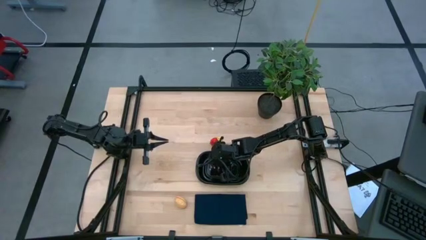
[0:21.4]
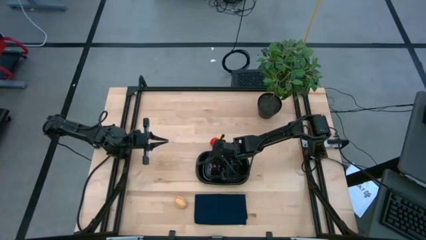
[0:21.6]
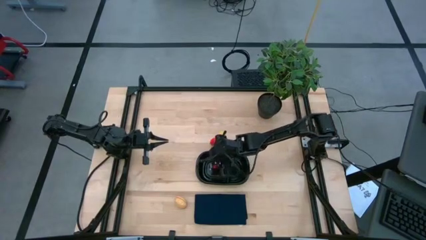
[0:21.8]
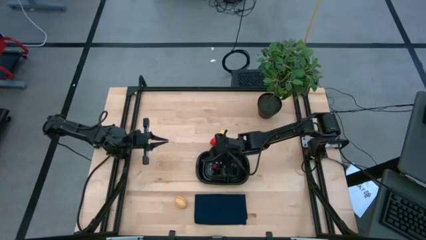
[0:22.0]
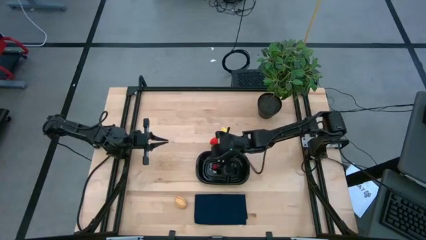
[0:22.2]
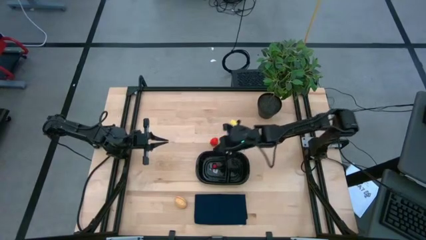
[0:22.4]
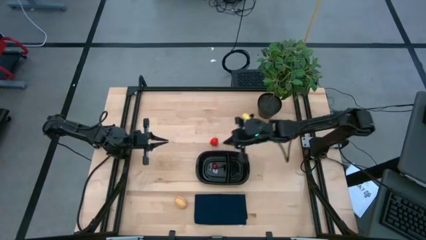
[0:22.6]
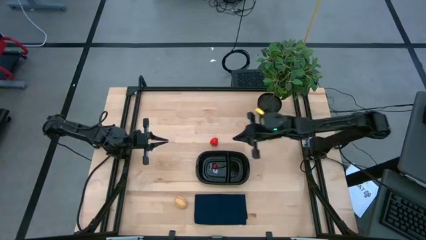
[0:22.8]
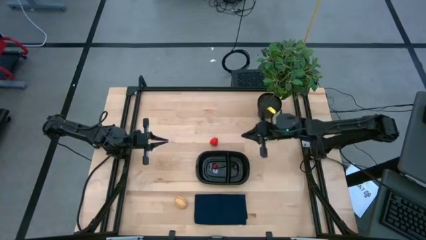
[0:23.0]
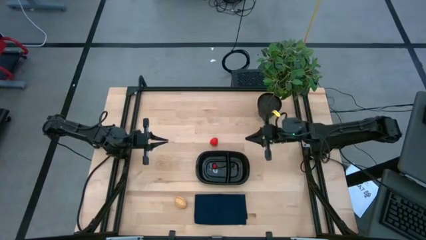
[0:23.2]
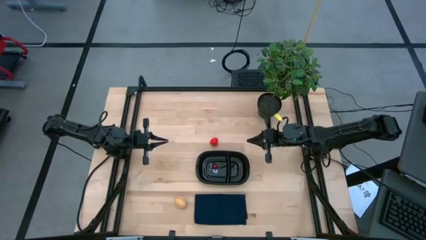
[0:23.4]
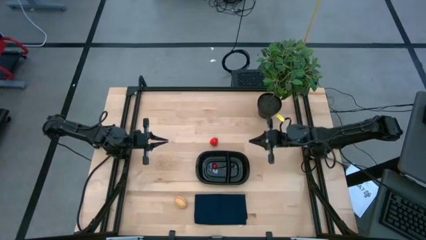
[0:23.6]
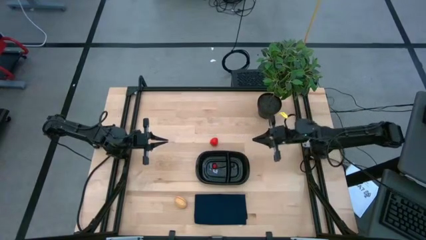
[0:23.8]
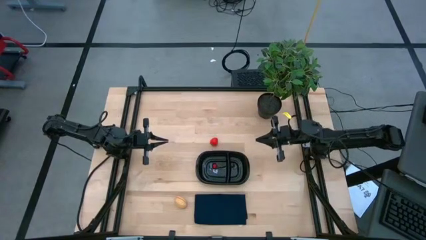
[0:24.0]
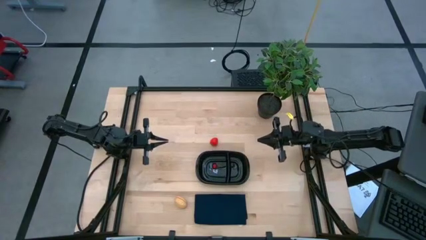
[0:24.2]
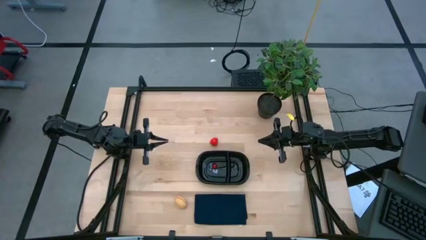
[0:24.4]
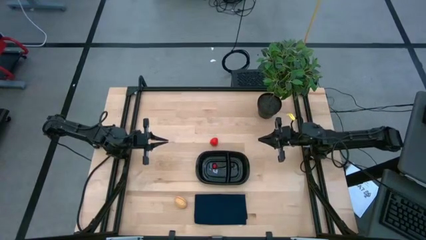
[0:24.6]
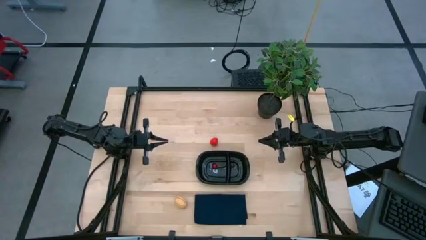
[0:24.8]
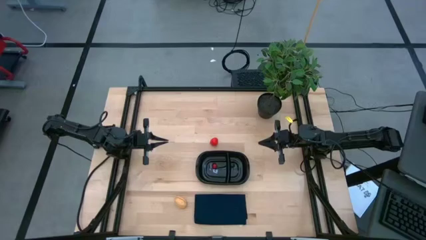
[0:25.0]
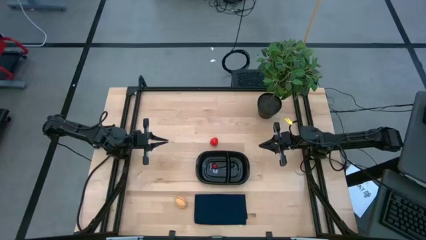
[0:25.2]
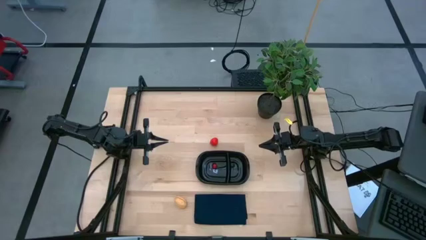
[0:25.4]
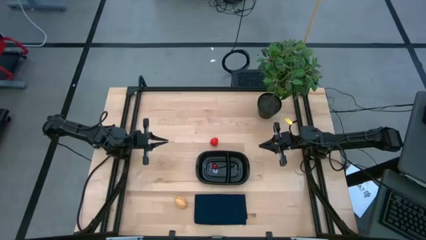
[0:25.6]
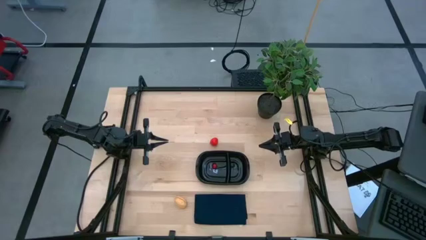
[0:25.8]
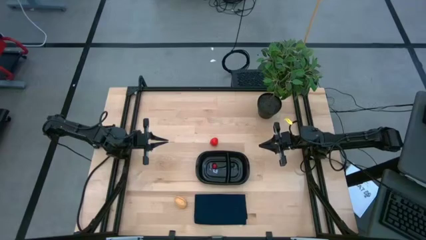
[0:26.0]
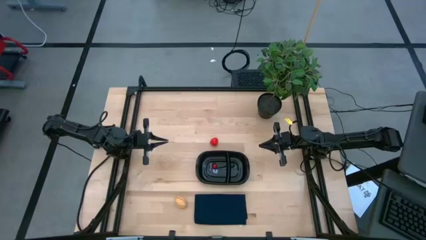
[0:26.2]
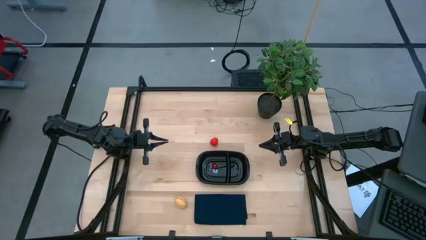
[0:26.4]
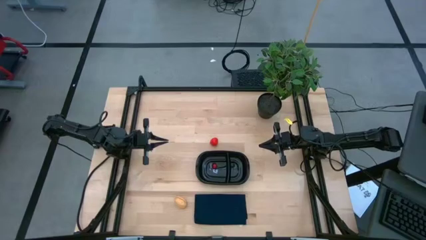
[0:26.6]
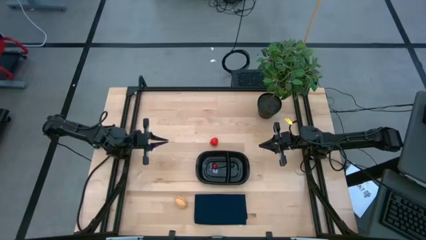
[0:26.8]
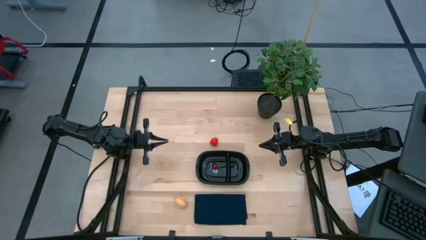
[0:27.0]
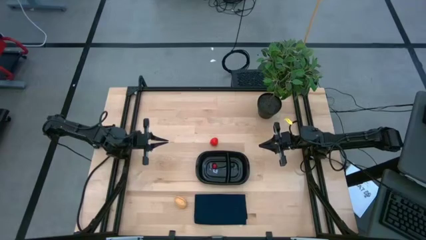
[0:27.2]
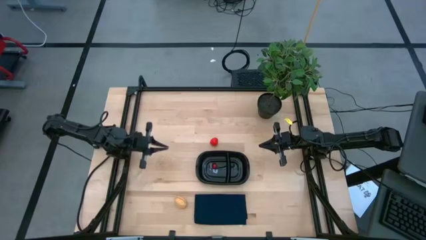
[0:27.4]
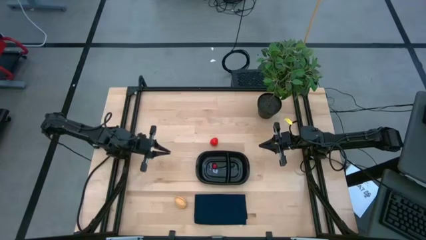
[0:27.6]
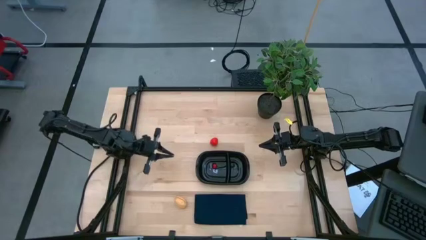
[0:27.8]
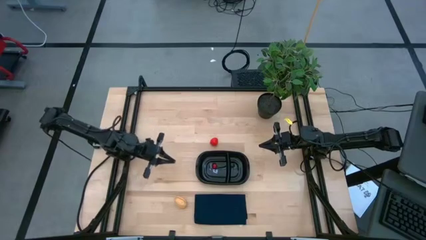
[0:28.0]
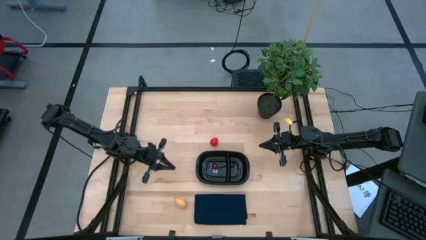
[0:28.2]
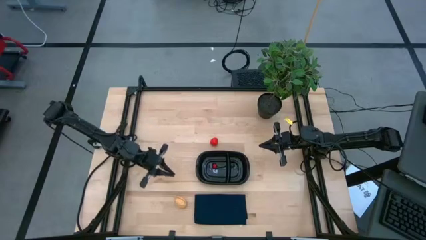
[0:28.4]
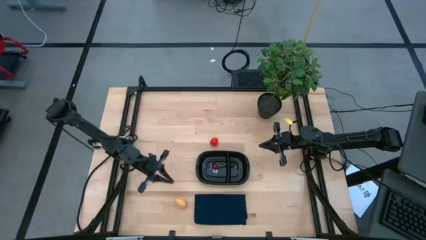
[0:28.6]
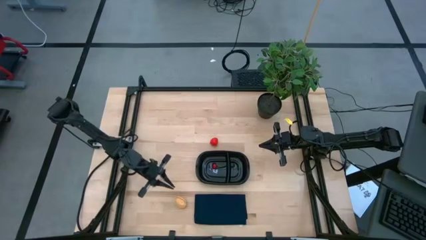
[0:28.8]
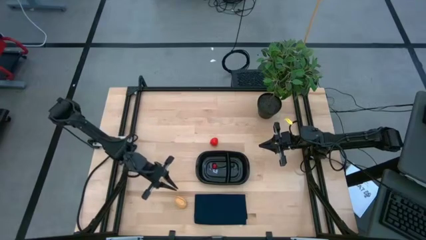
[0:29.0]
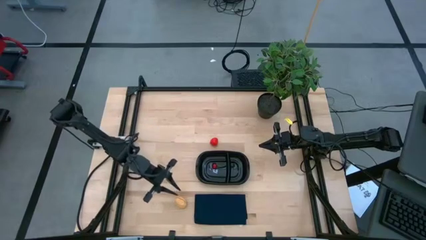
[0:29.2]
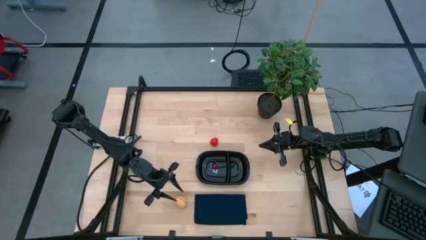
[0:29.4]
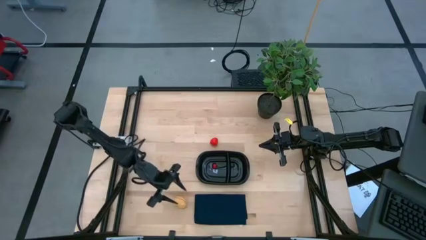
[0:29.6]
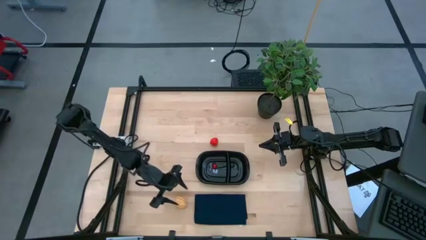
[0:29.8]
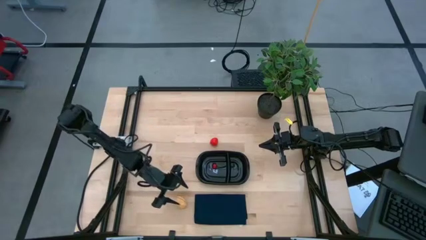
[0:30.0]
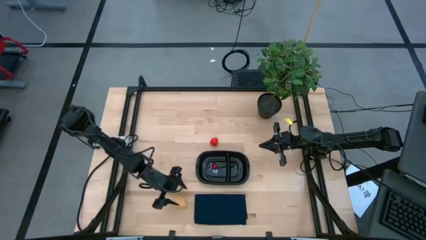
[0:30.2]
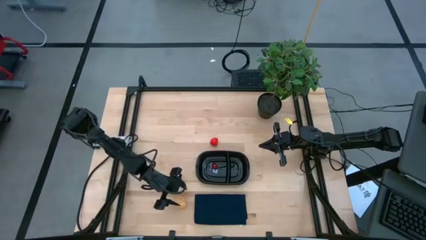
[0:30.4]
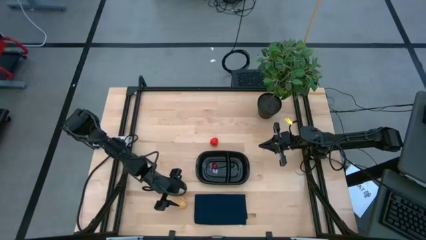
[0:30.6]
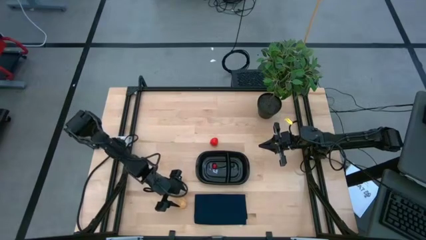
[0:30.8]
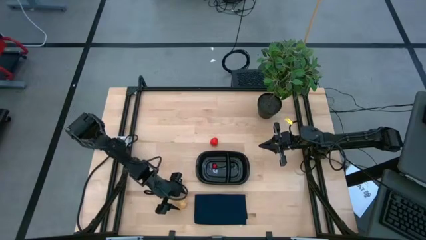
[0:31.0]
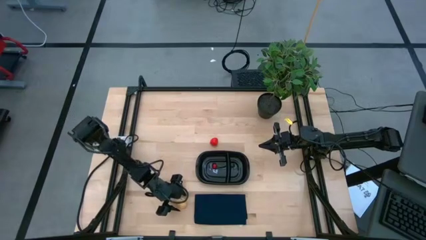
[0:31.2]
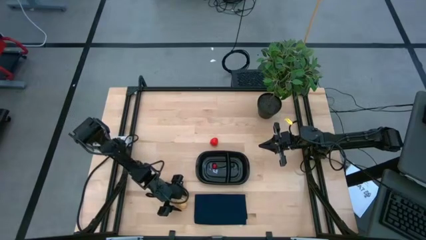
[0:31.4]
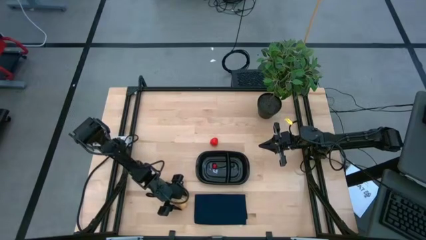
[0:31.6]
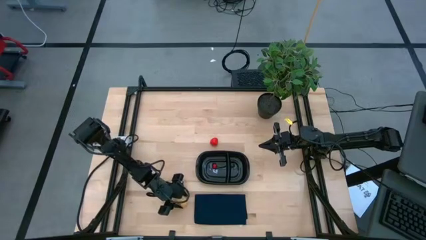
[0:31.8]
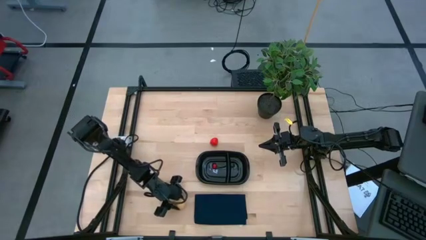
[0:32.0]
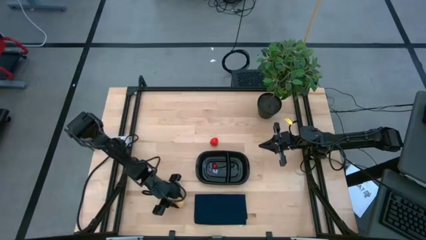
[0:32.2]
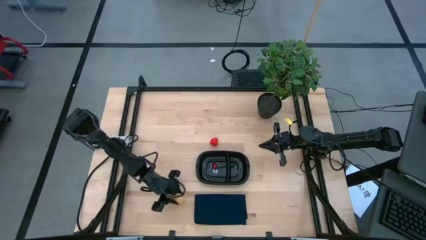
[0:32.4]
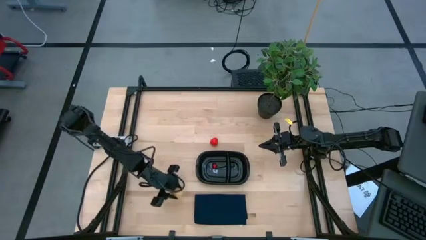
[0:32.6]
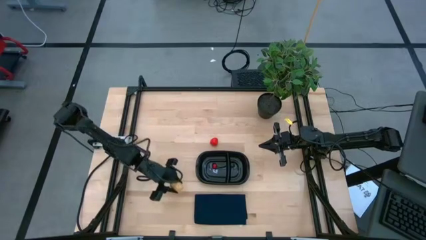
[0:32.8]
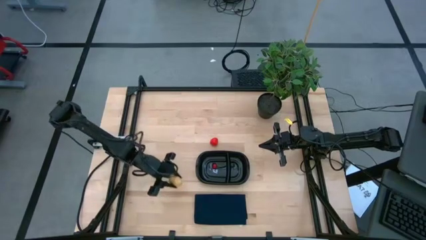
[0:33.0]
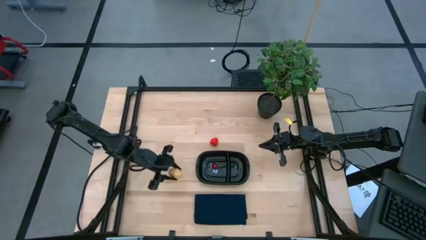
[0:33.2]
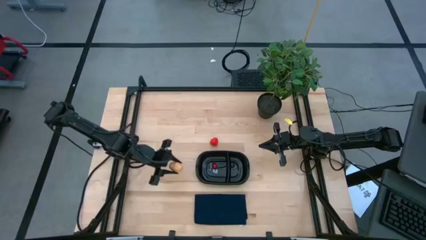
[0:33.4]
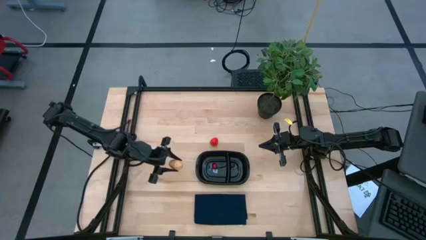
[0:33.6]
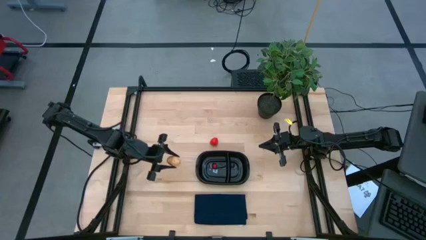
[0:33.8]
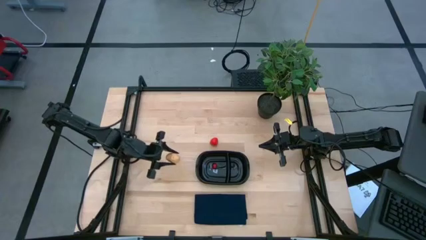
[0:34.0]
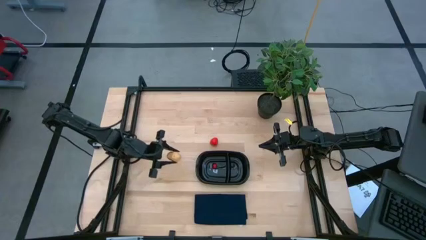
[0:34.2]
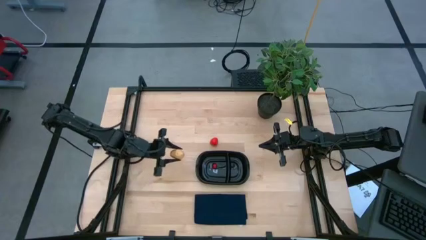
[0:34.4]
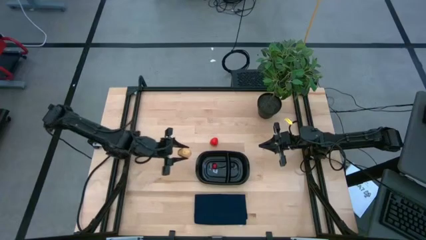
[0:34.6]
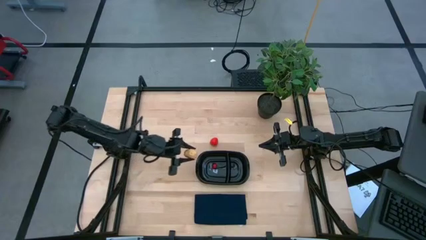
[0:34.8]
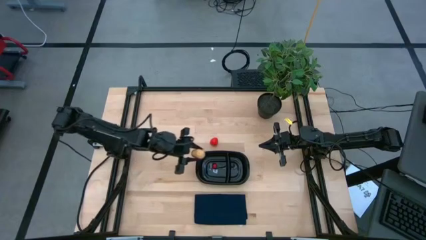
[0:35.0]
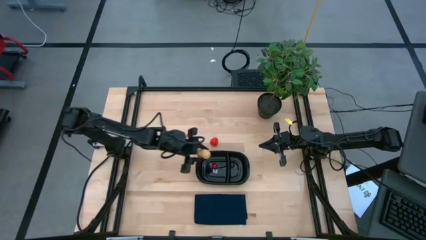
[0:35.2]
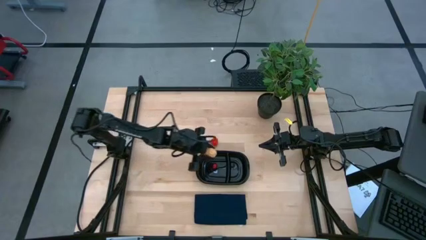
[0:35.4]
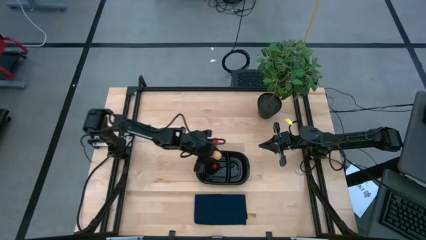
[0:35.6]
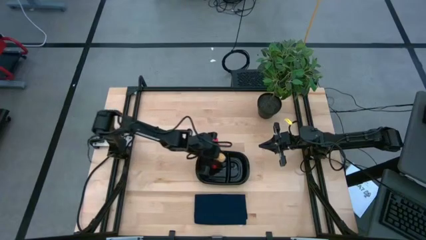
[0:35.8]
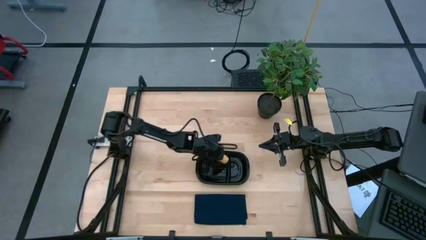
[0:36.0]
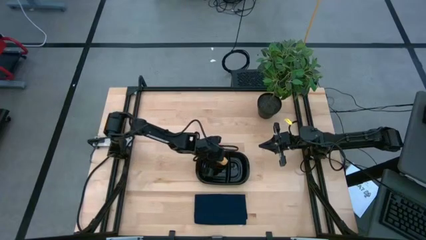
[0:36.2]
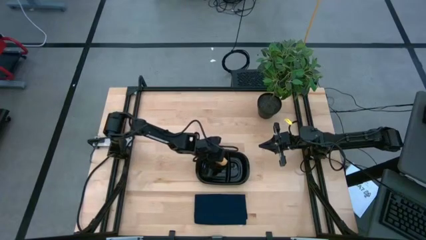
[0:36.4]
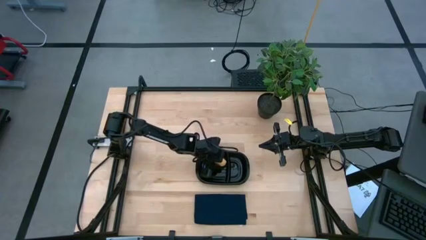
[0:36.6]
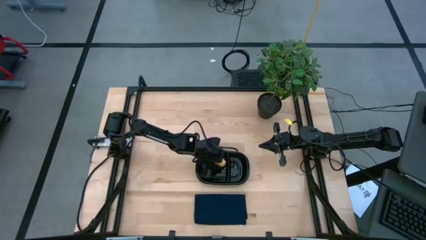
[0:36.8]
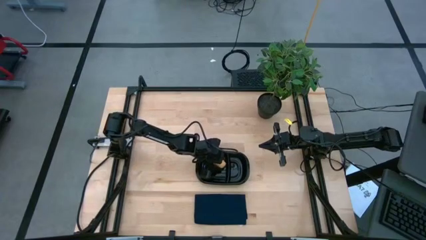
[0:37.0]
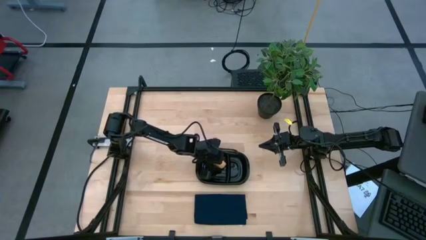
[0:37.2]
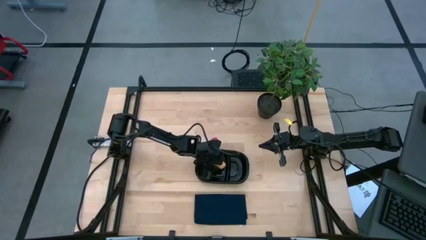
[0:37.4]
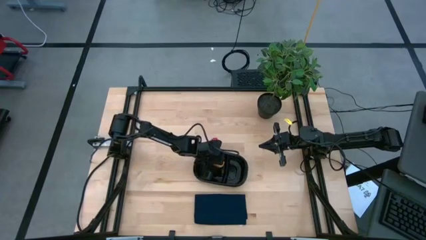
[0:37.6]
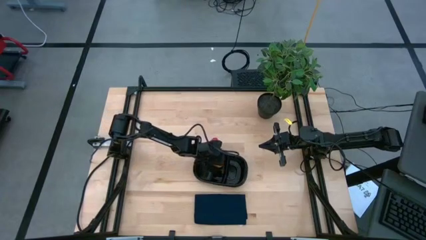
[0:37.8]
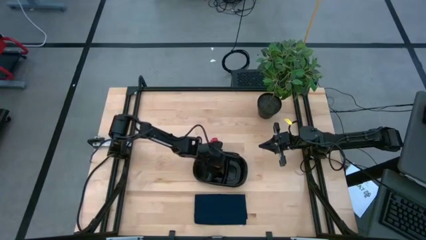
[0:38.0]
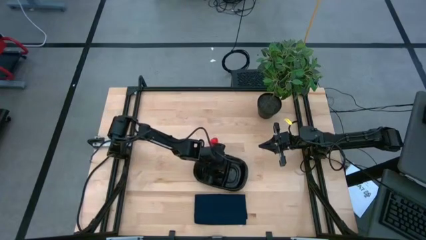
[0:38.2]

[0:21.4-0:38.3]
Task: Pick and placing Produce into tupperware
Put the potato into the black container

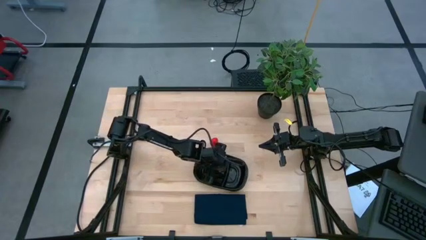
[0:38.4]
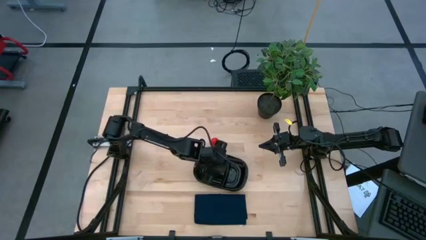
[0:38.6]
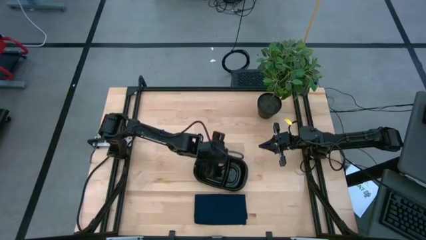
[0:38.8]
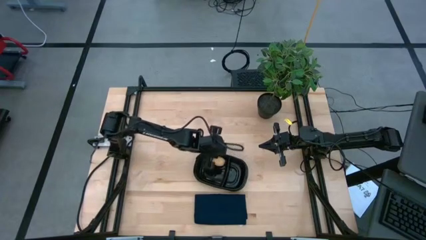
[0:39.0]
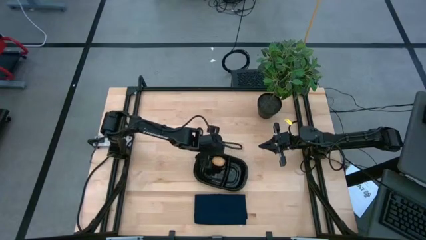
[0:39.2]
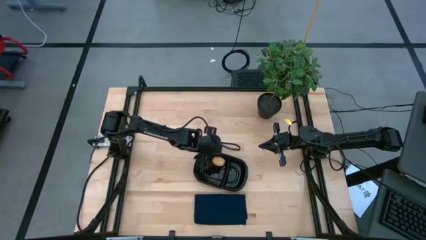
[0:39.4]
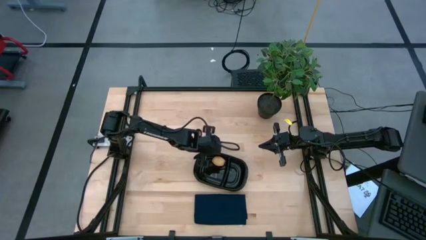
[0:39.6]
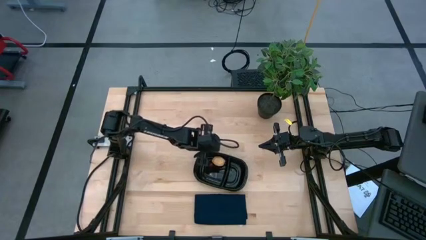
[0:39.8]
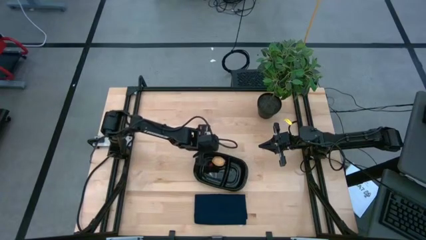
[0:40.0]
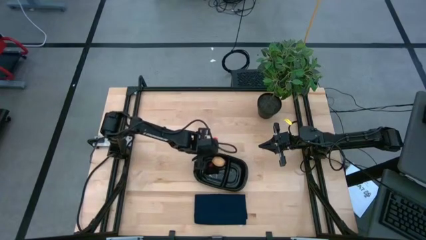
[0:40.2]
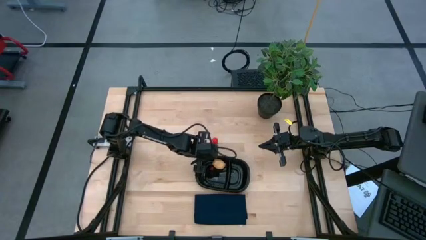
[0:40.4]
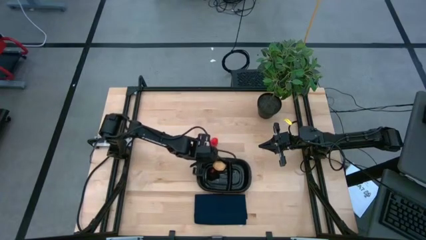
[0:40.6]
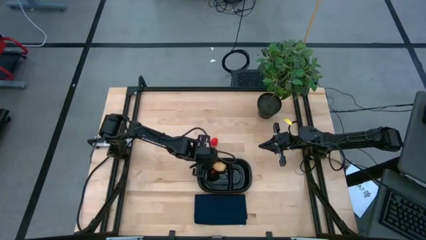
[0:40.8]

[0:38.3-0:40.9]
Adjust the black container
